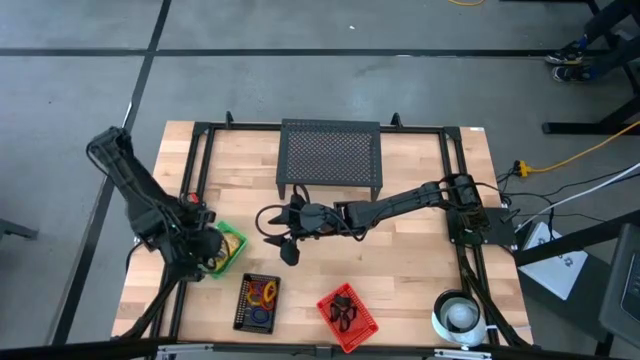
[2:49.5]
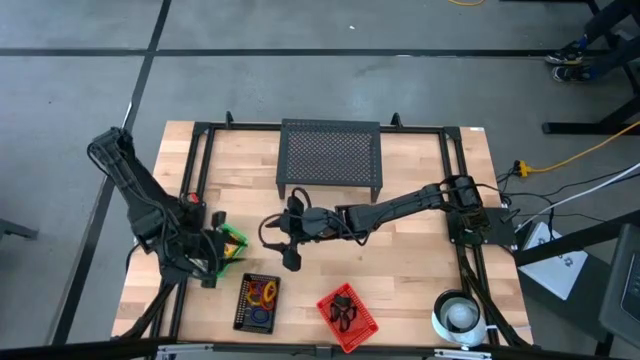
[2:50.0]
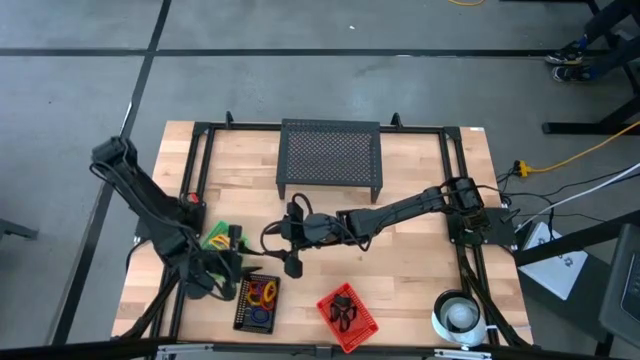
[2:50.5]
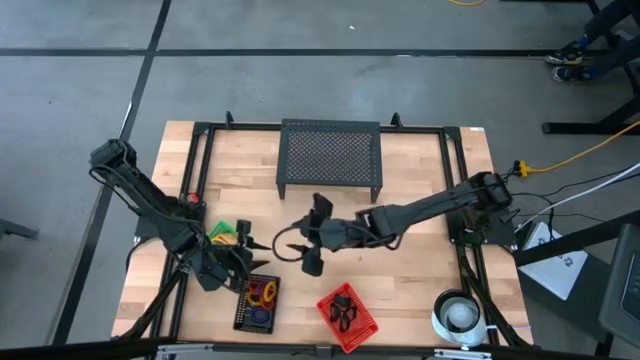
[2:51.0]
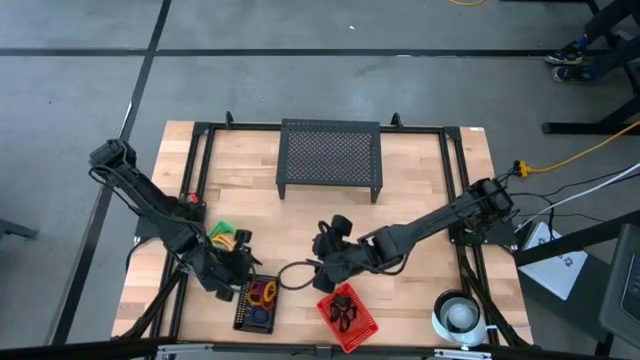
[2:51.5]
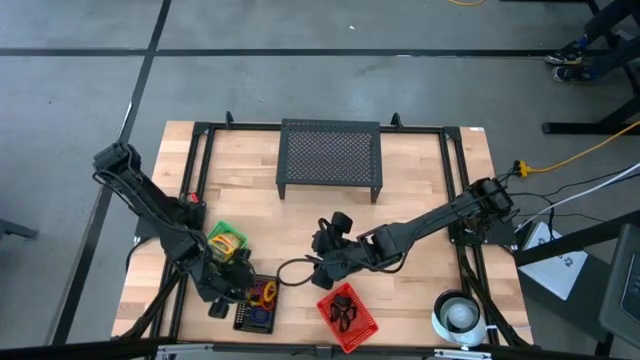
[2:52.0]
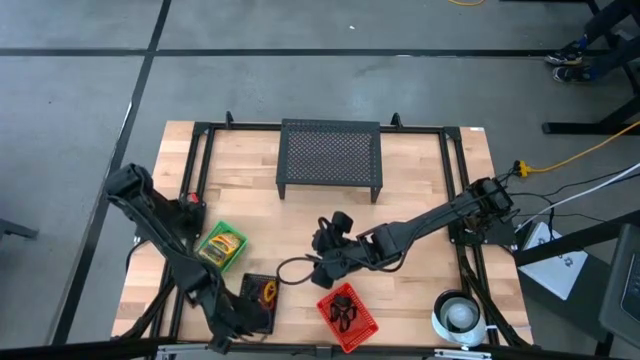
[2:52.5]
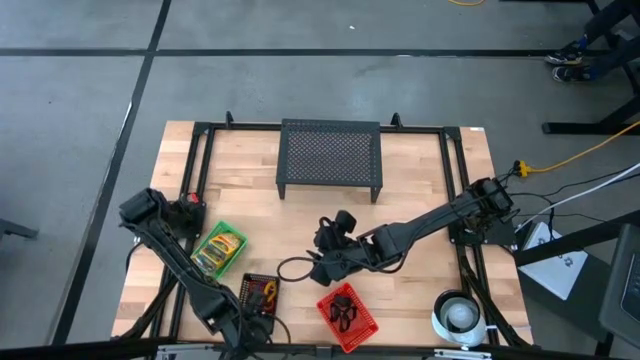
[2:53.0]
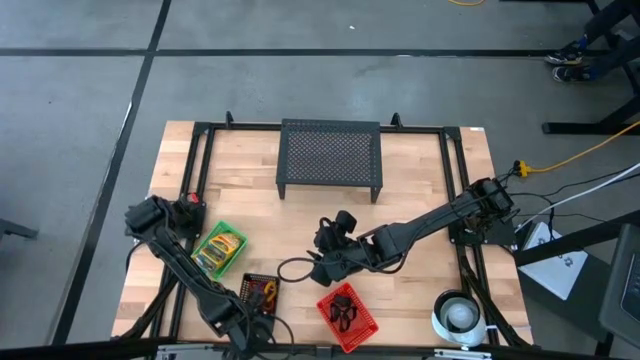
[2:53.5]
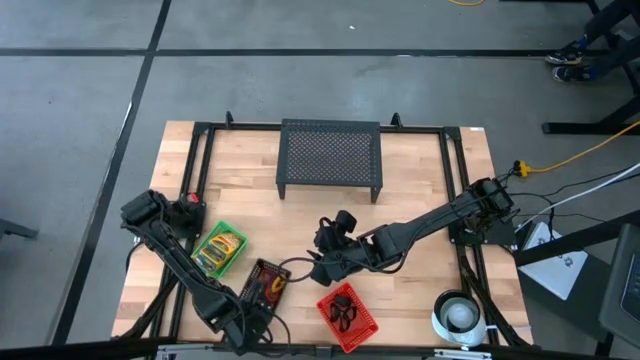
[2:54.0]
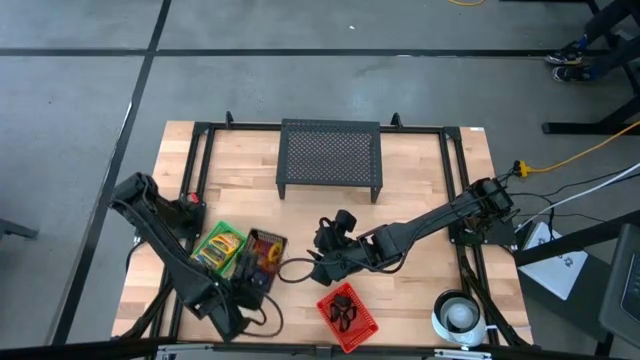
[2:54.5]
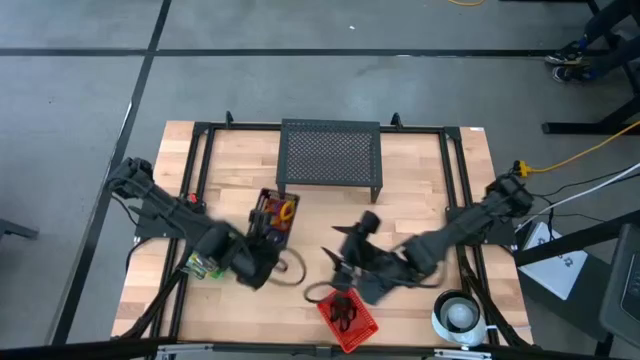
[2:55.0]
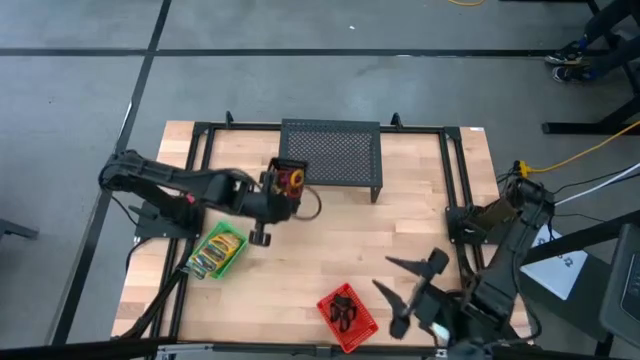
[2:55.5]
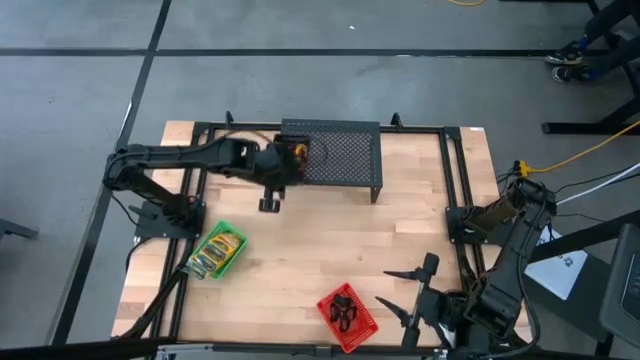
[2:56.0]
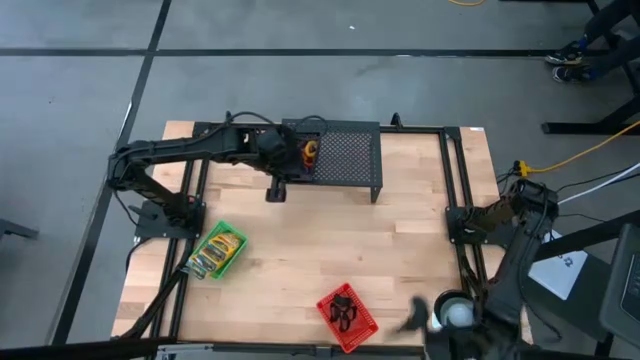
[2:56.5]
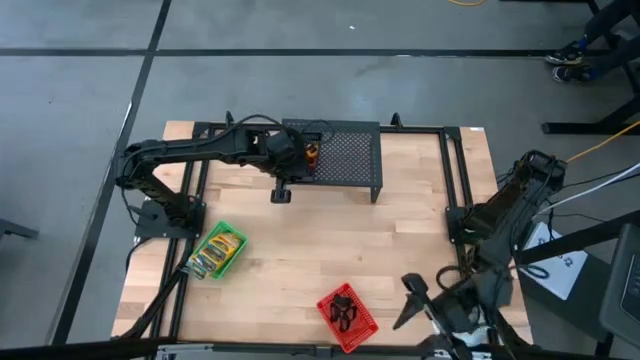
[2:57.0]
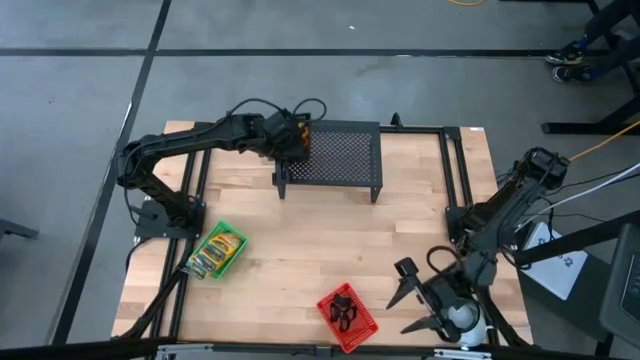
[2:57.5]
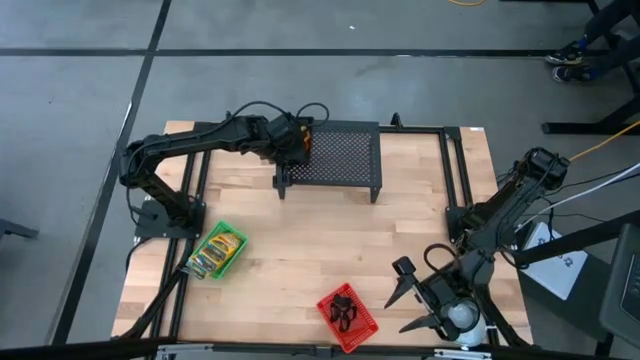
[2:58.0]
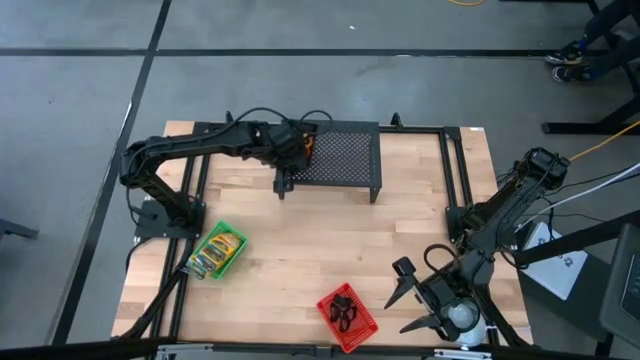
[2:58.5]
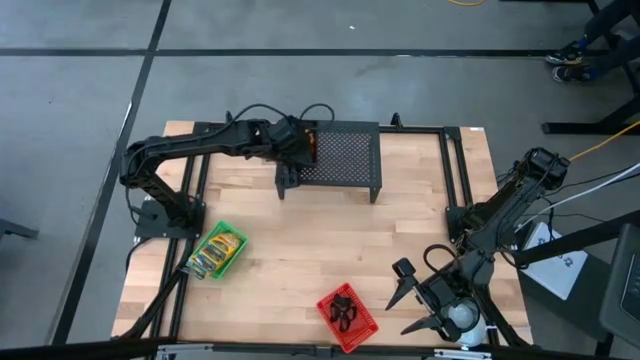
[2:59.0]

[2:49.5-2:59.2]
Task: Pick & Place Office Desk Supplies
Put the black bin on the shelf

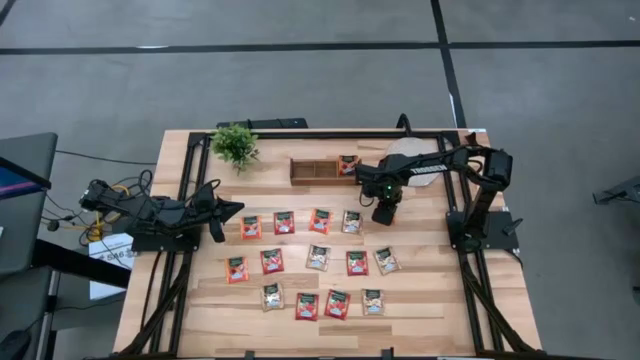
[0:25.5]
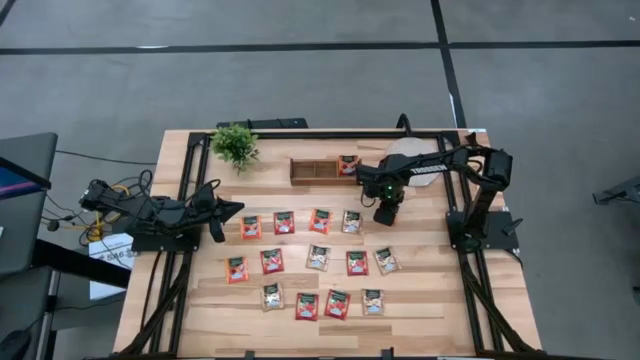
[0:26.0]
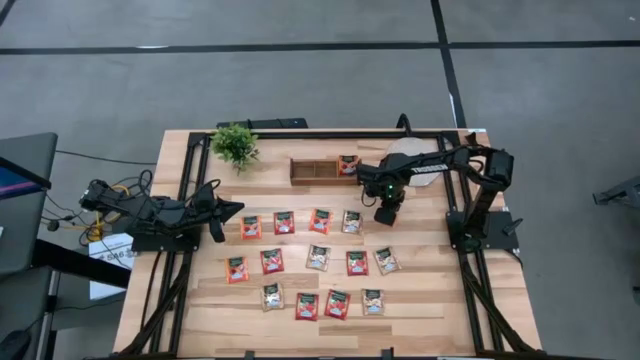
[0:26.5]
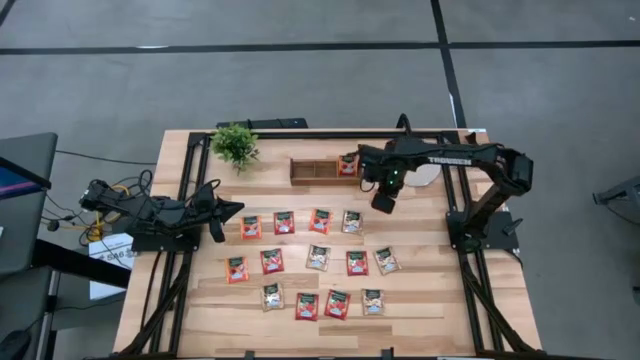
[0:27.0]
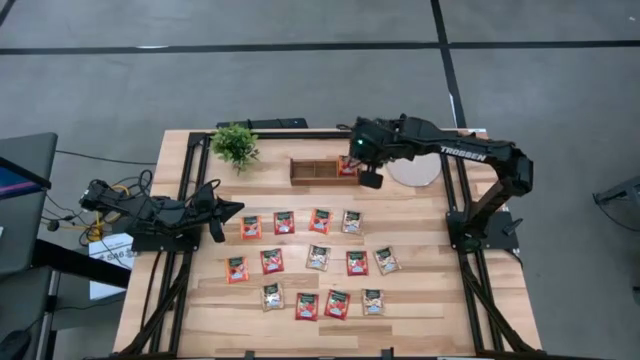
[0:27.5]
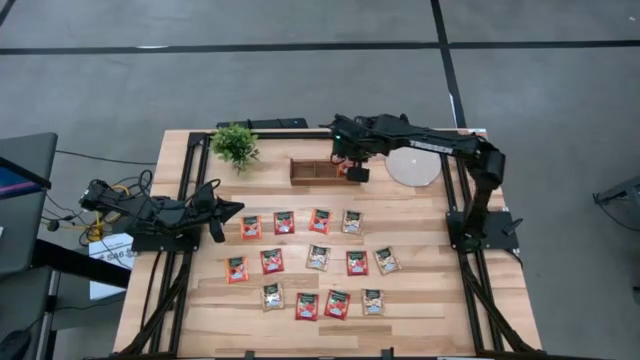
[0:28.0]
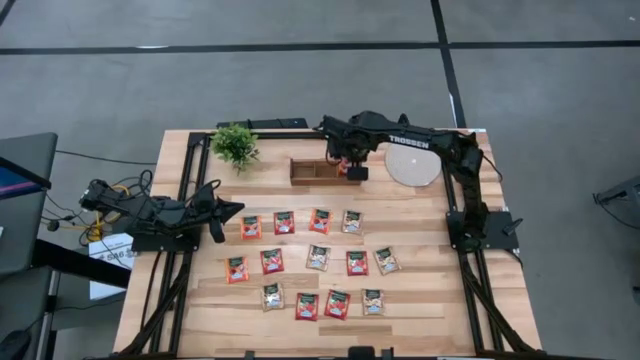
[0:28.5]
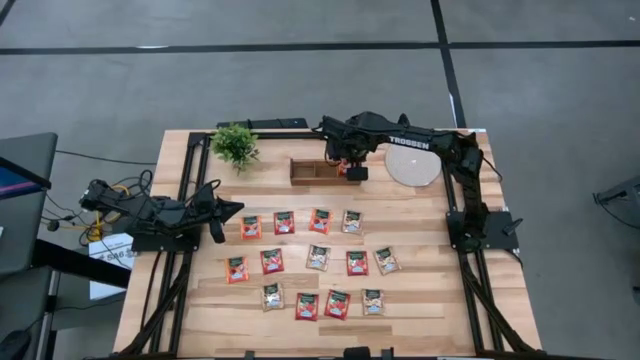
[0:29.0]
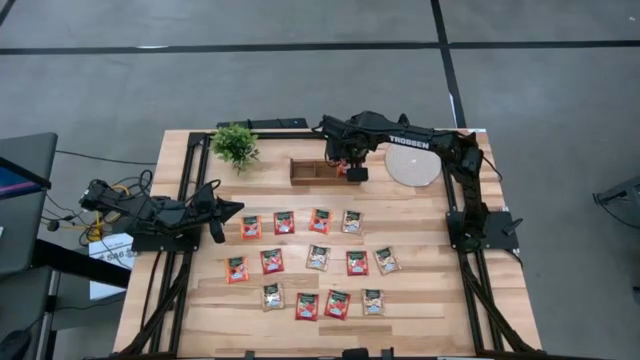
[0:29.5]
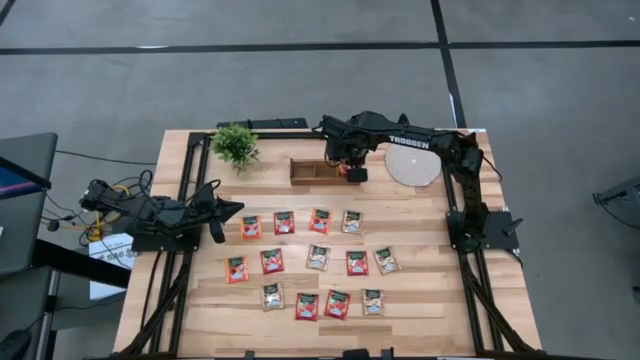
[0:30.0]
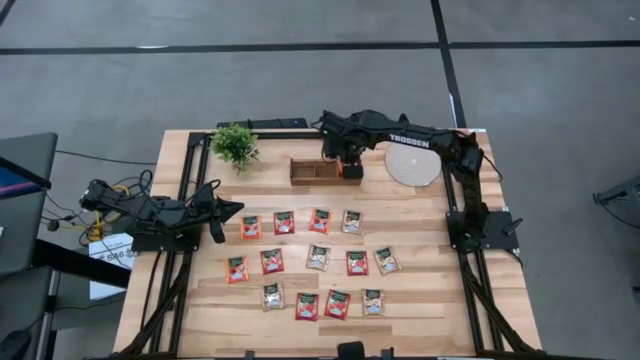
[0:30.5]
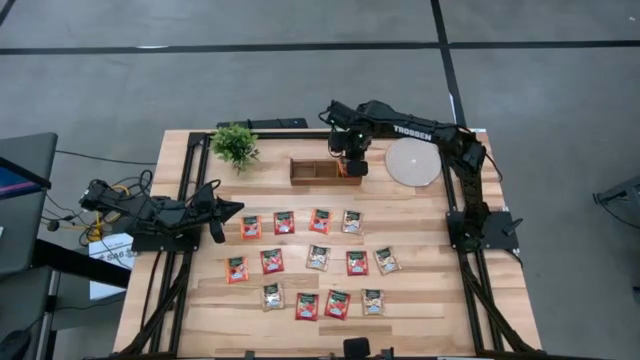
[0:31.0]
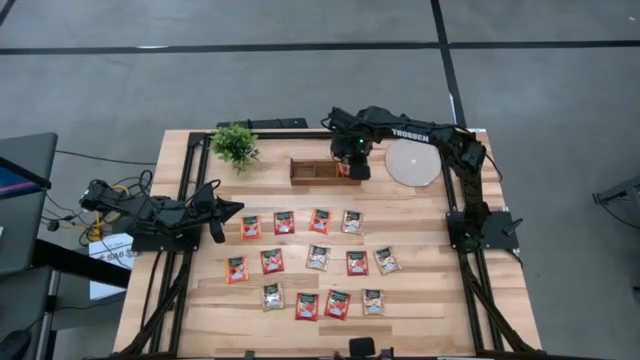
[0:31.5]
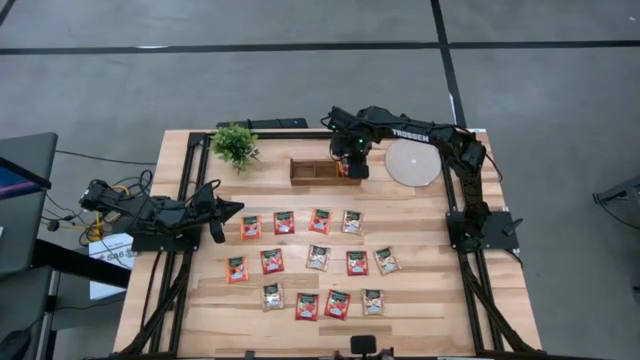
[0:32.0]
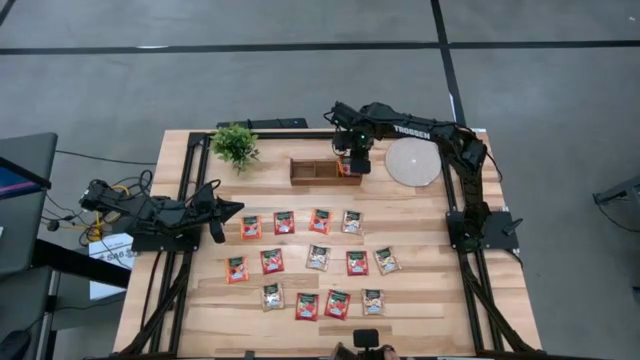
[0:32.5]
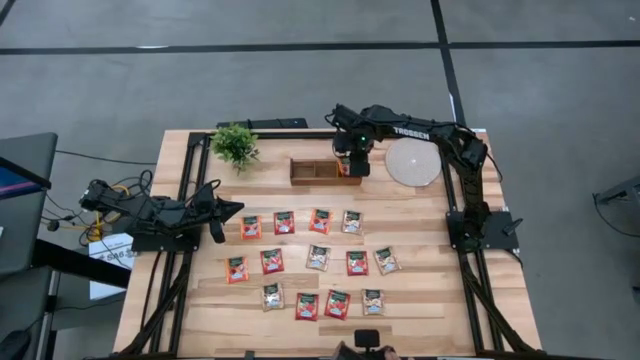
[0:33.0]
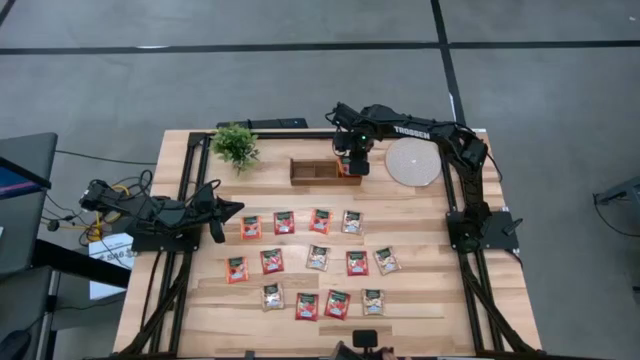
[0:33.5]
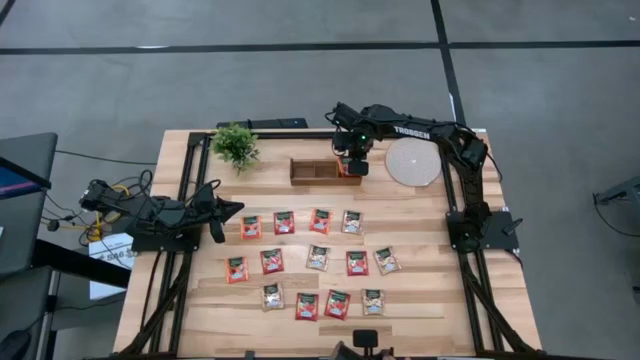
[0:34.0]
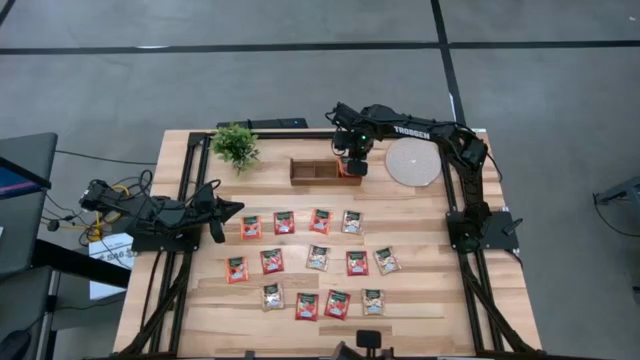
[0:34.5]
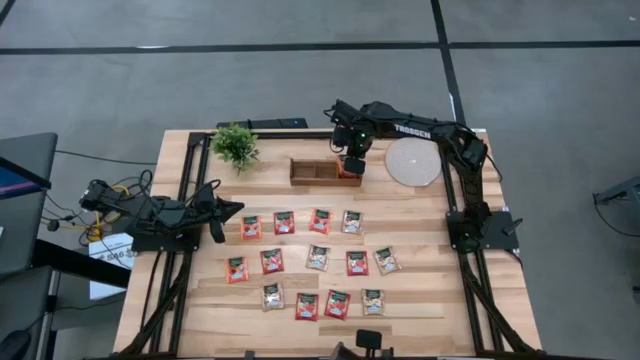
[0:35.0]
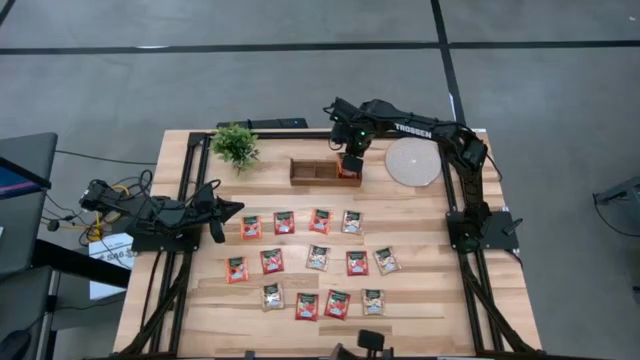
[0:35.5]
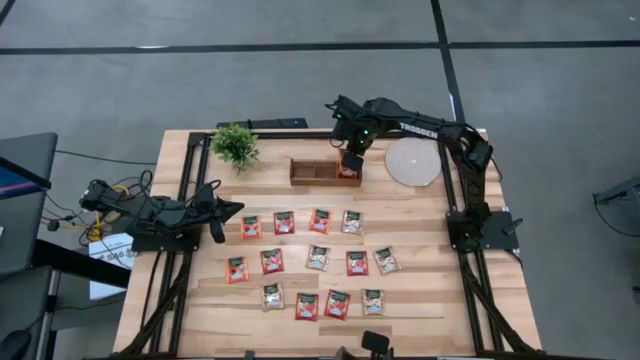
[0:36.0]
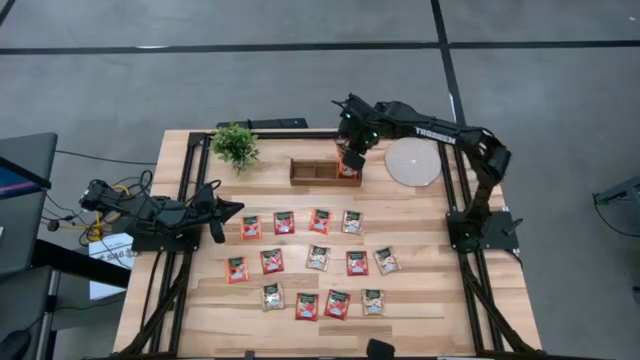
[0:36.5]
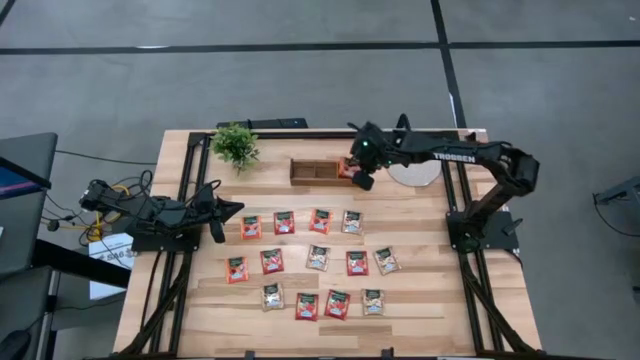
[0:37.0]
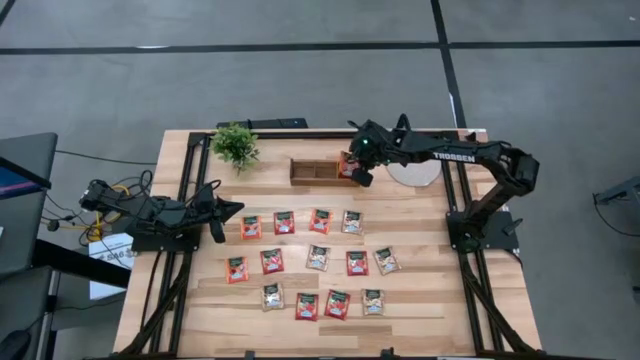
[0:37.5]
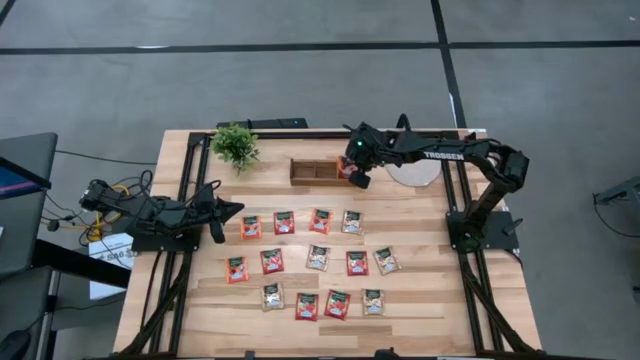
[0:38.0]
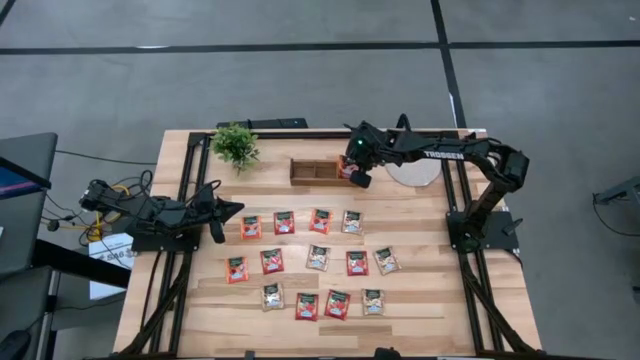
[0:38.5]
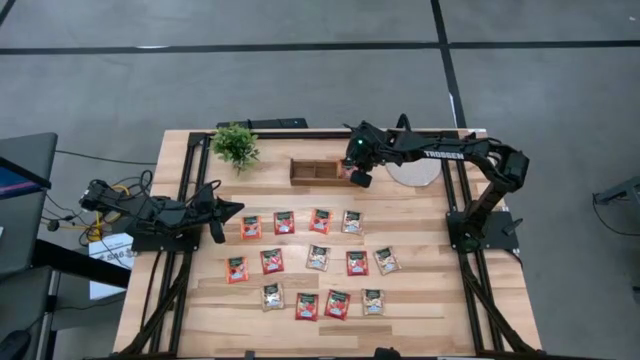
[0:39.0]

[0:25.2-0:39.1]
Task: Pick & Place Tea
Put the orange tea bag into the right section of the wooden organizer
